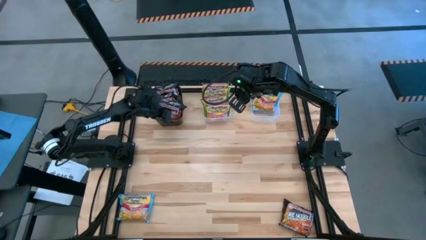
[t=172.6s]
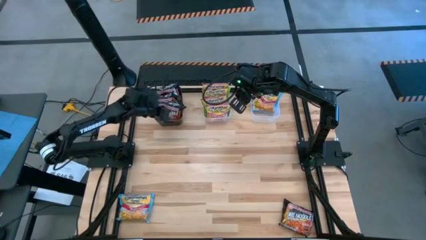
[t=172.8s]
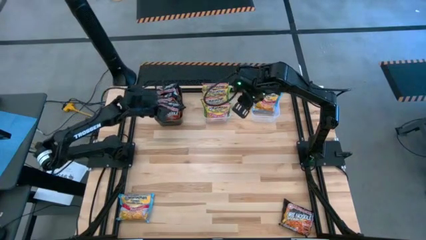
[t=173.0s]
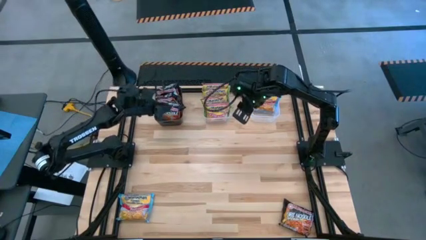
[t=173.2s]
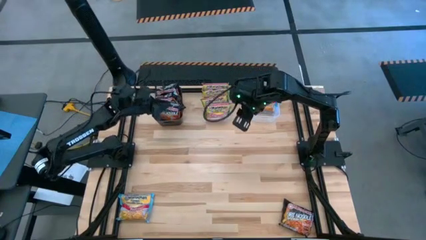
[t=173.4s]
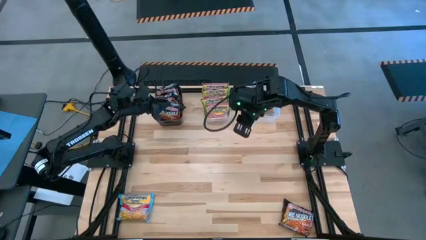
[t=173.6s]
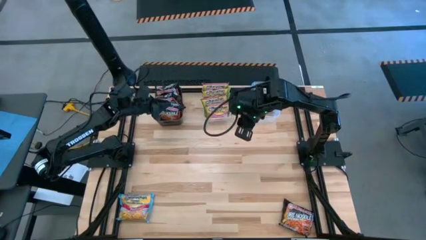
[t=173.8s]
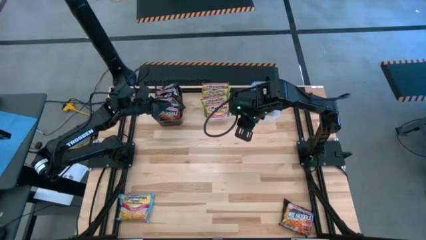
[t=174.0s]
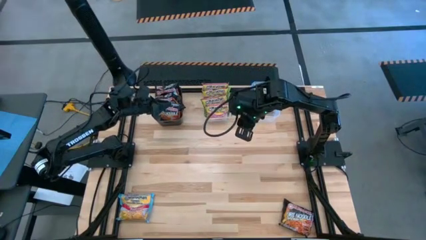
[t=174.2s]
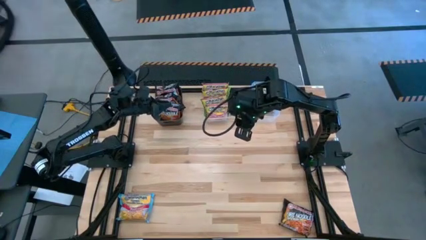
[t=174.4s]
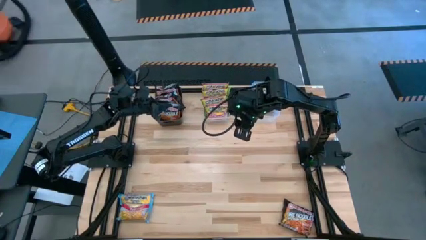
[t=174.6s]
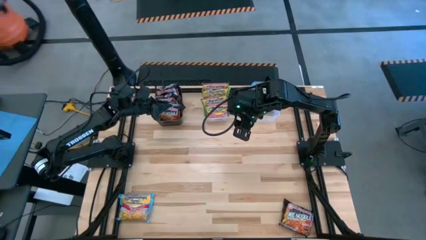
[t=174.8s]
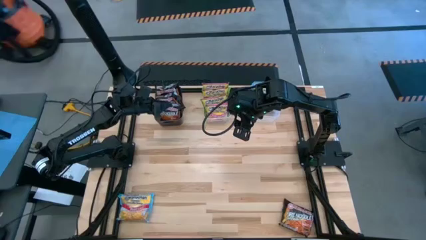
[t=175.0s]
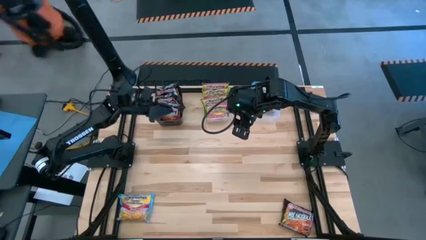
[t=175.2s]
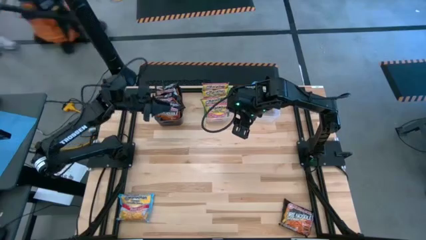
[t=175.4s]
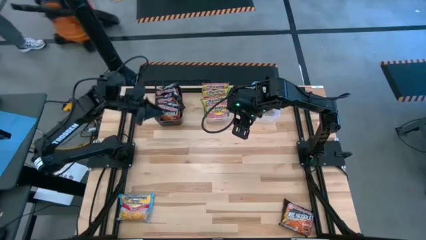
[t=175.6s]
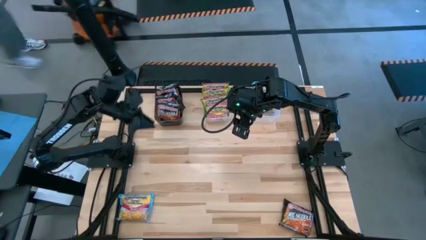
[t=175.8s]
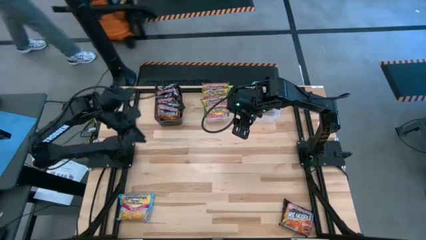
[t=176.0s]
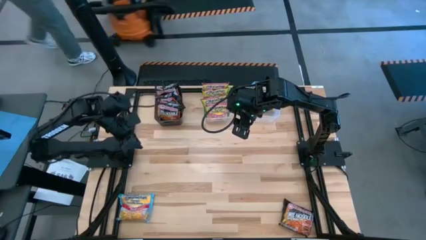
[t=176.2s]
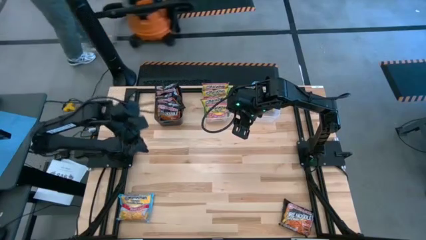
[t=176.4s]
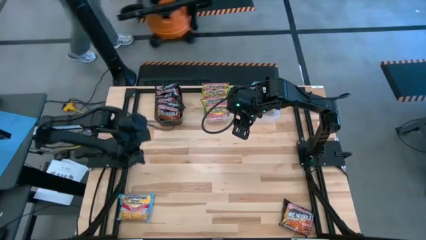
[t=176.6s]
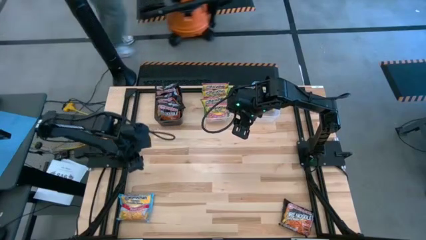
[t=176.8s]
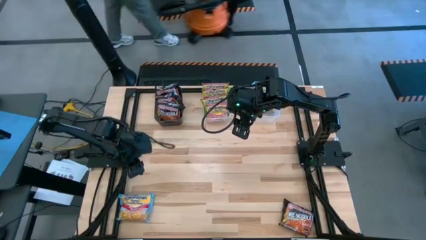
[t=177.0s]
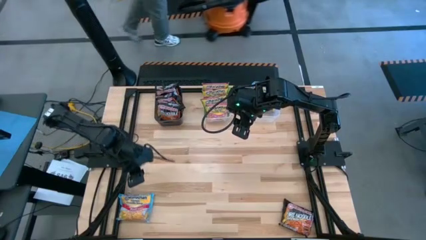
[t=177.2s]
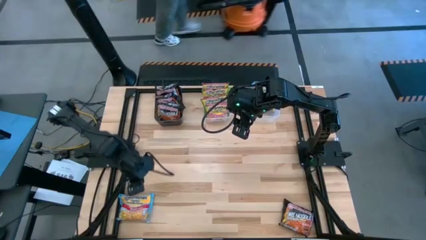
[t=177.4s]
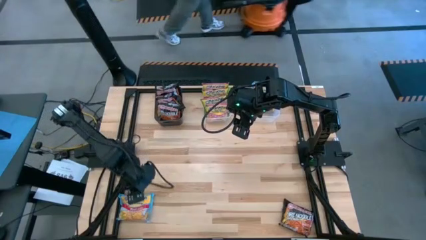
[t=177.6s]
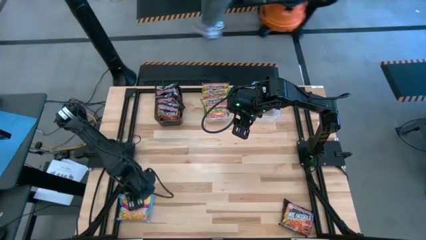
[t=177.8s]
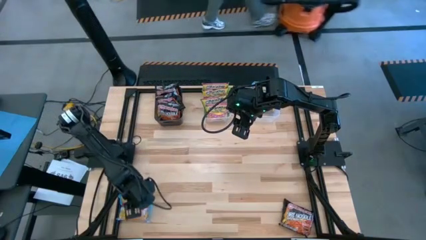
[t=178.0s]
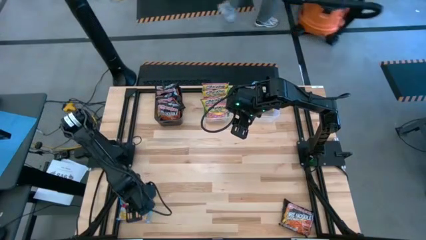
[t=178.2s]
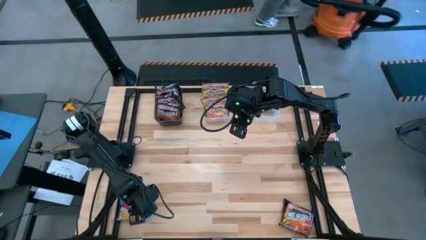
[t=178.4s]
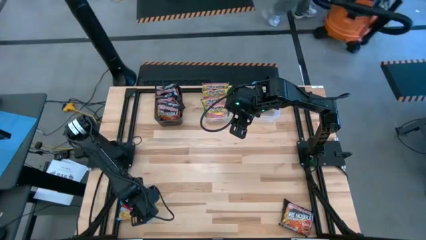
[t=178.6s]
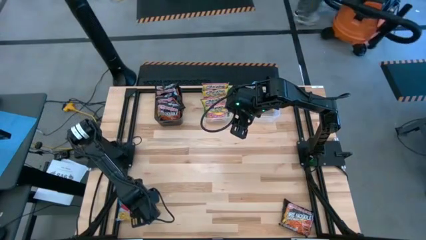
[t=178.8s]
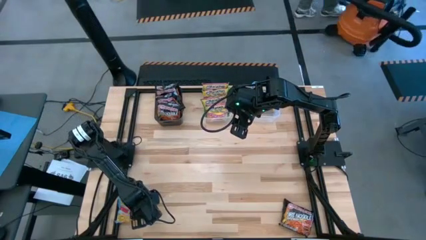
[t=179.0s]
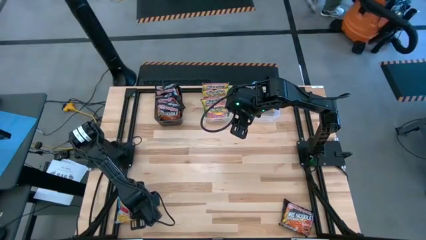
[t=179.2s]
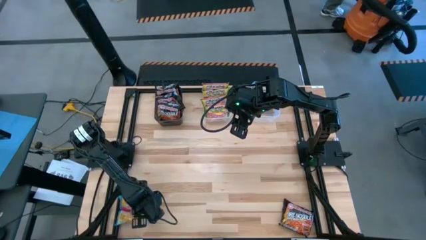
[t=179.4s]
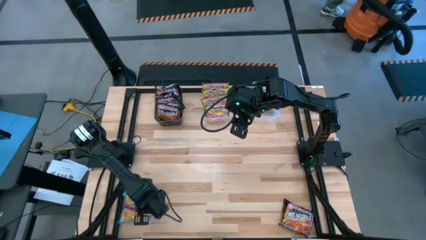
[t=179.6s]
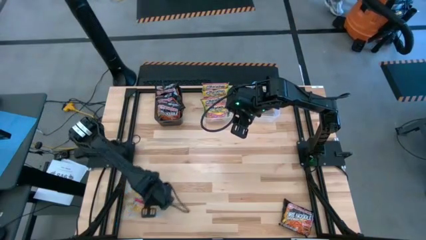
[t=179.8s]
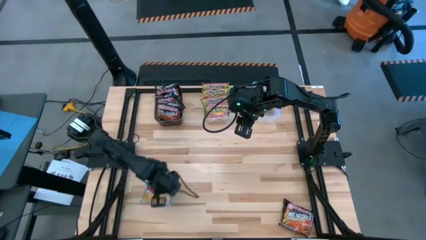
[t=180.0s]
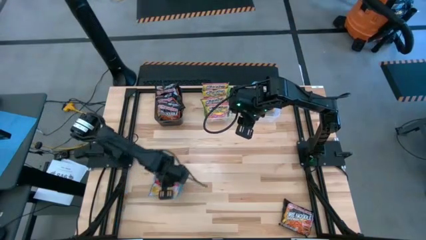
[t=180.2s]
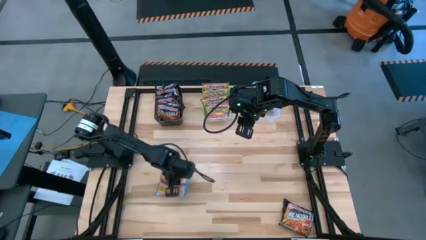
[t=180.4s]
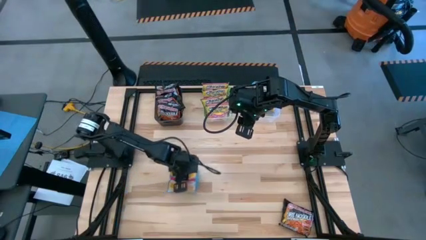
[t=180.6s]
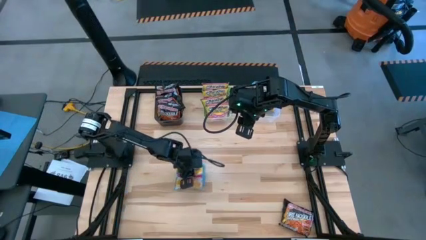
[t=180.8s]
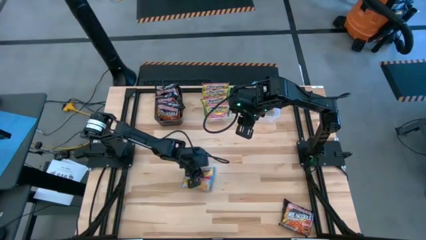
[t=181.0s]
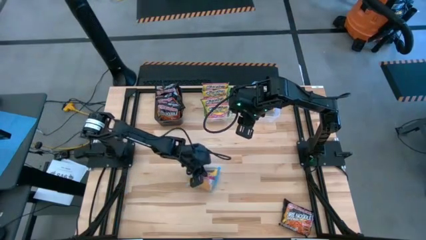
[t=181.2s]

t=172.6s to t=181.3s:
Task: Sort Maruchan noodles
Put the blue noodle pack into the right transparent bin

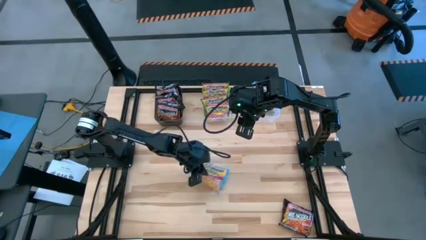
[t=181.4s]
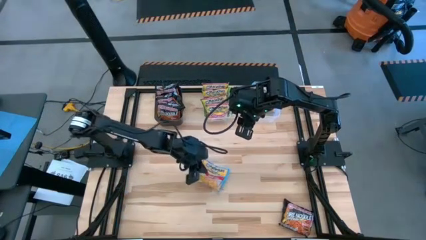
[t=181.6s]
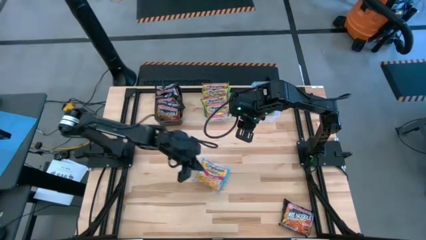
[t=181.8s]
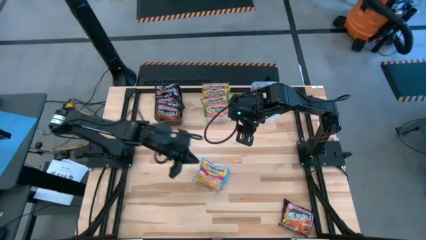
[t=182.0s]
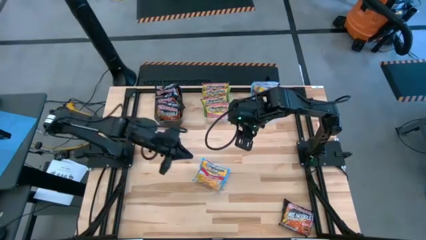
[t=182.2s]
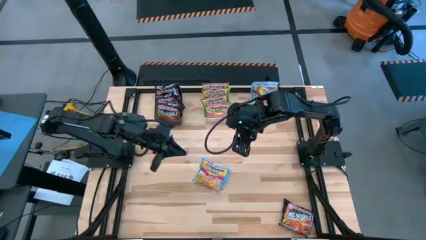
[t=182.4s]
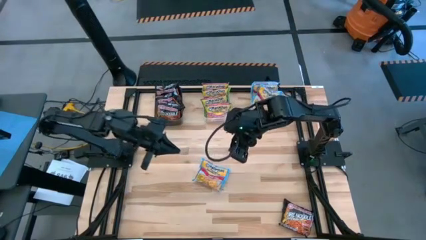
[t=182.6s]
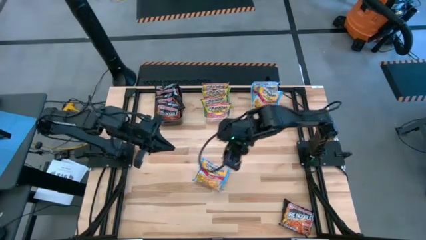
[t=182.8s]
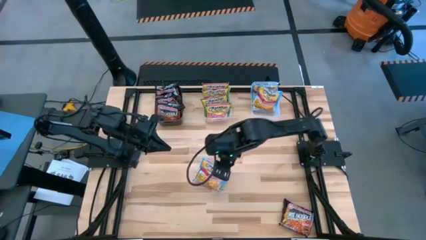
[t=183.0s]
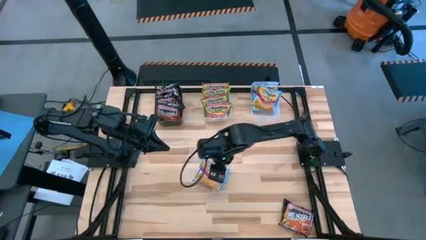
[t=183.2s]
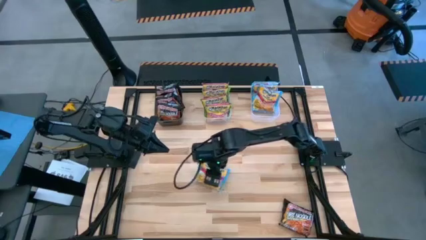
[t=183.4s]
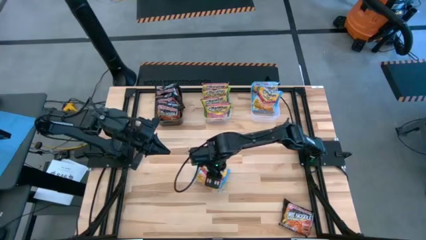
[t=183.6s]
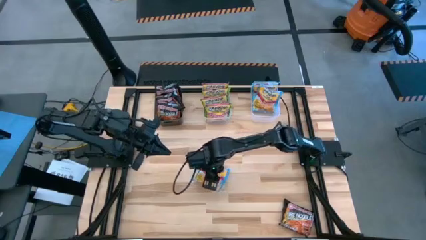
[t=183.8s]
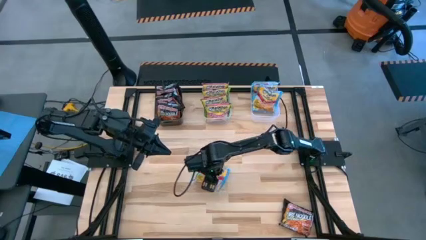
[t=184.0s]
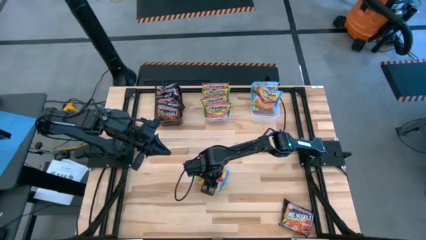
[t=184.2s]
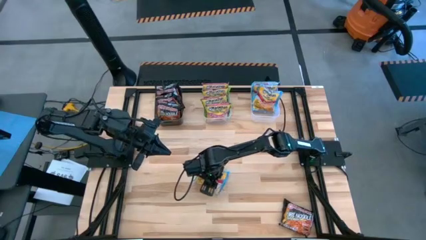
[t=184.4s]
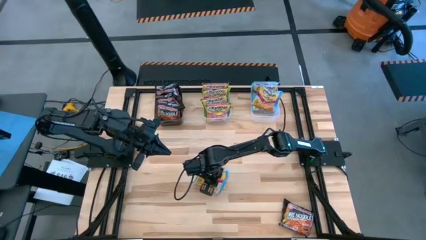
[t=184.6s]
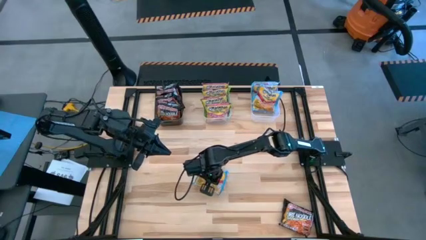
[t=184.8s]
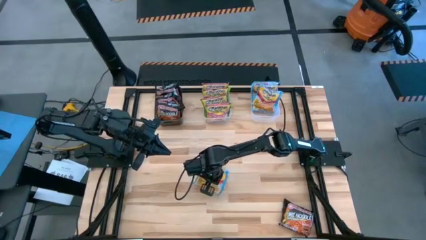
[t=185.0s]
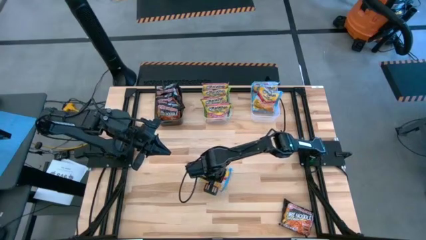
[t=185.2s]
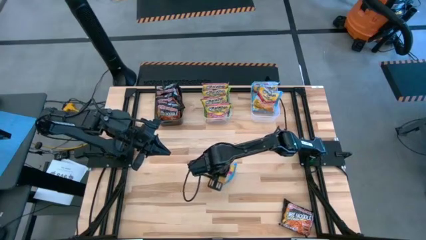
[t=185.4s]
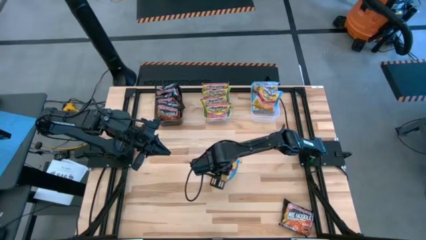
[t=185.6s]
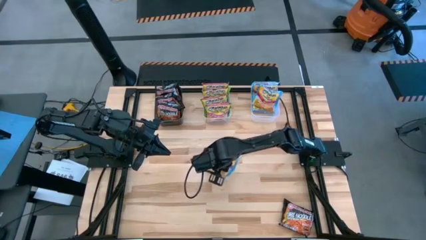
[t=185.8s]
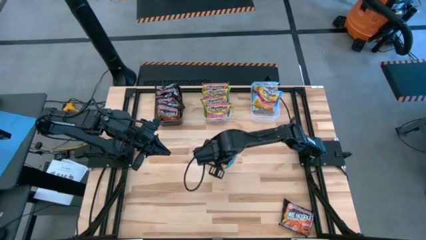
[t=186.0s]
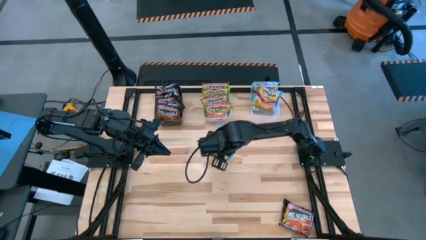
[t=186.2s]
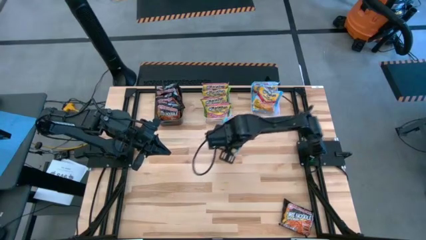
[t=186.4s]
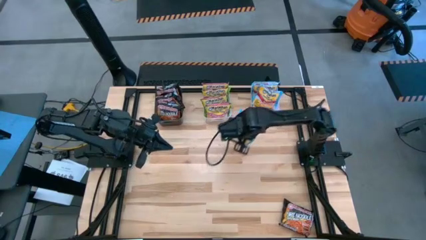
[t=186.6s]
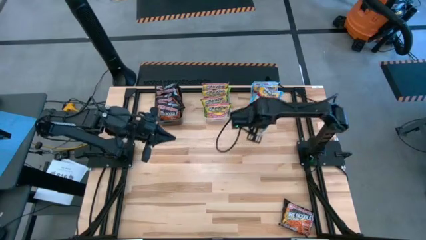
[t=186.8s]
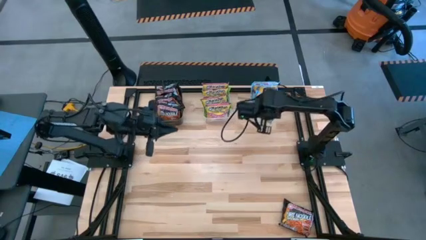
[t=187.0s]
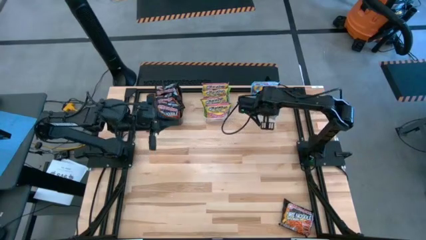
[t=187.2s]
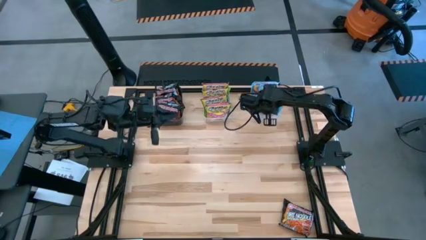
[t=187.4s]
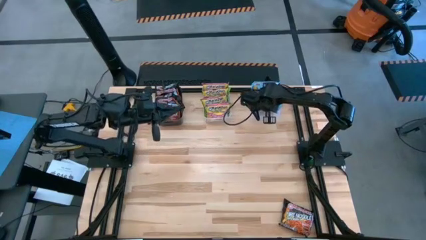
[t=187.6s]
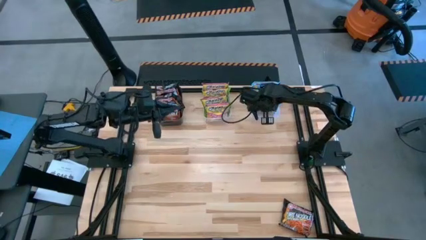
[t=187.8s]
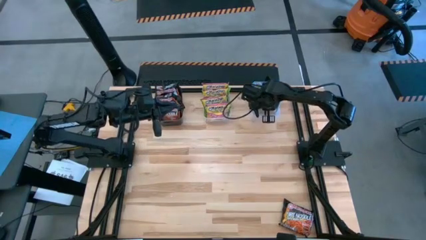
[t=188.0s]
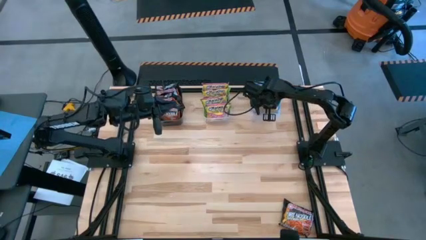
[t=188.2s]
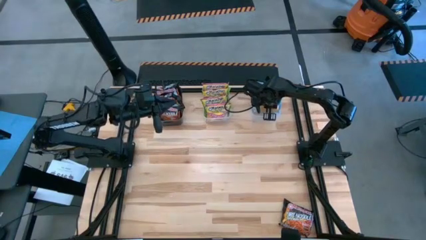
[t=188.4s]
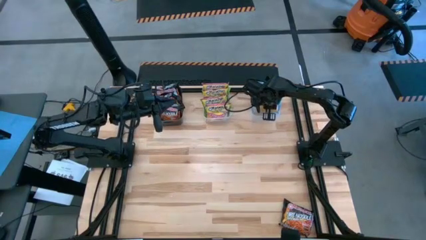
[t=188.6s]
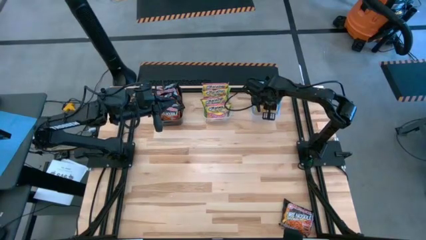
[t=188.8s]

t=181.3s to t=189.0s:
Put the blue noodle pack into the right transparent bin
